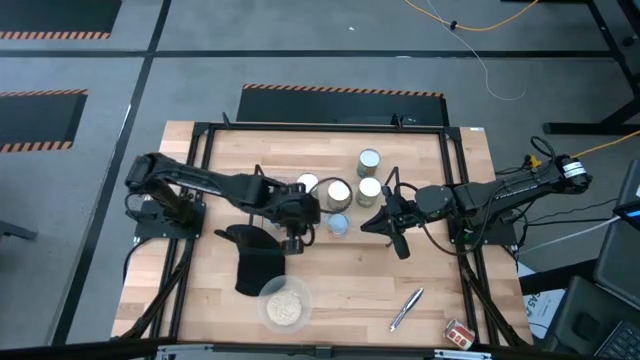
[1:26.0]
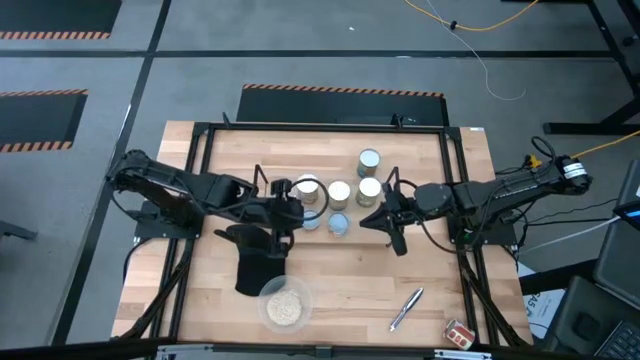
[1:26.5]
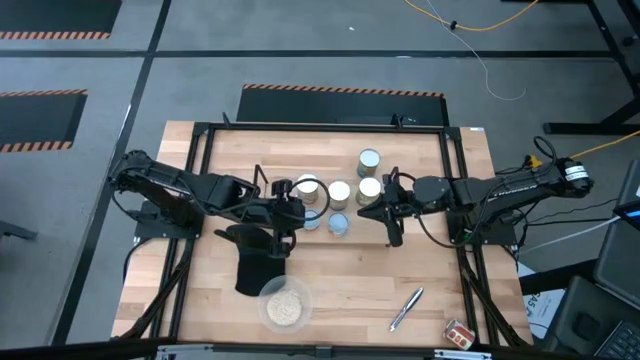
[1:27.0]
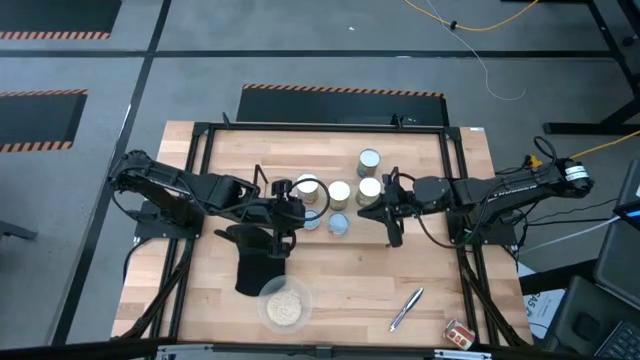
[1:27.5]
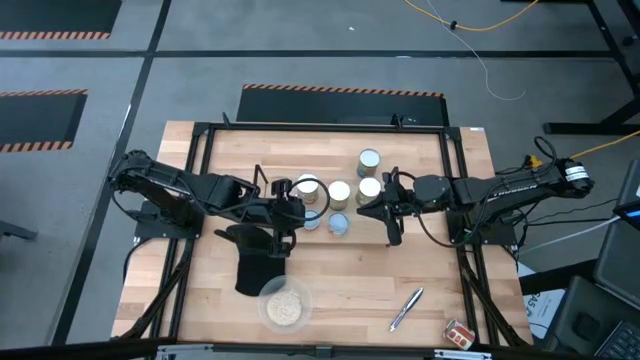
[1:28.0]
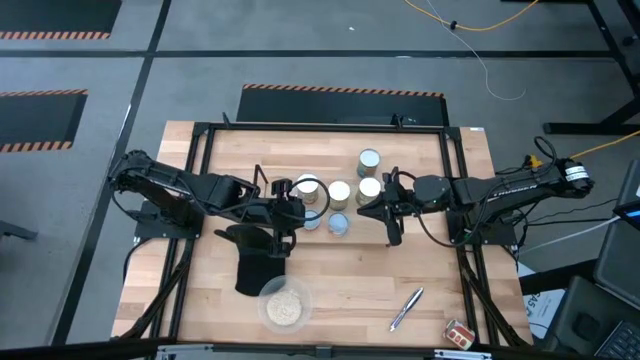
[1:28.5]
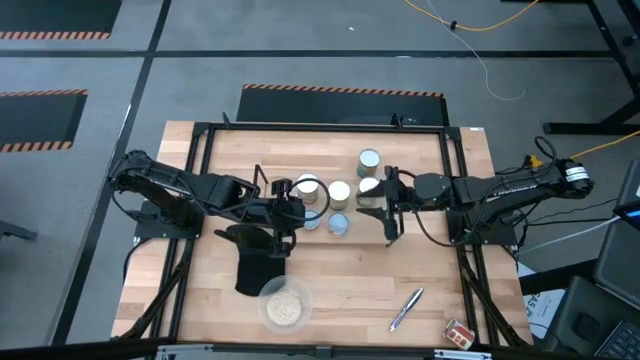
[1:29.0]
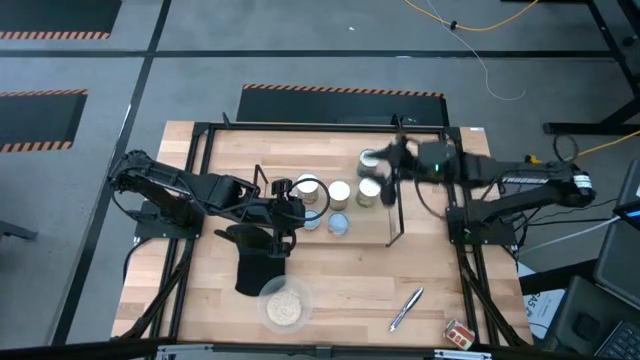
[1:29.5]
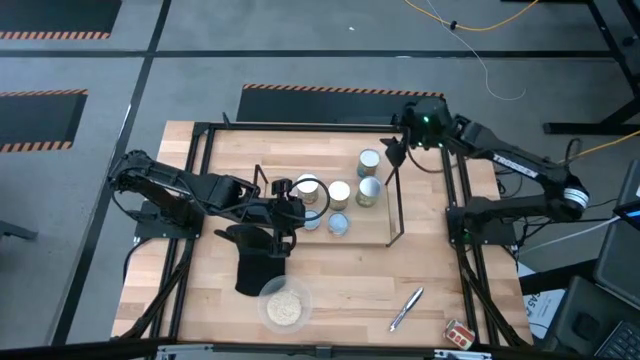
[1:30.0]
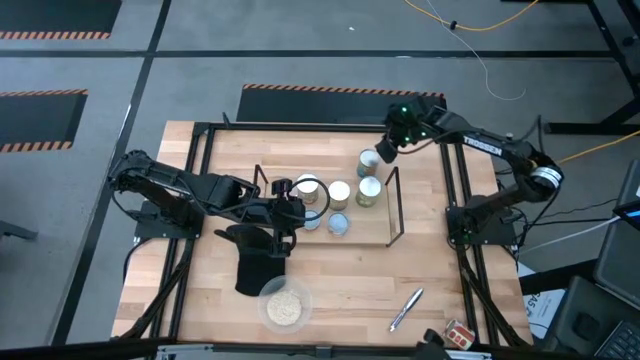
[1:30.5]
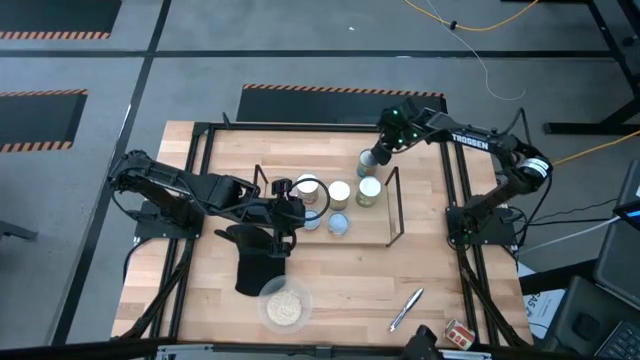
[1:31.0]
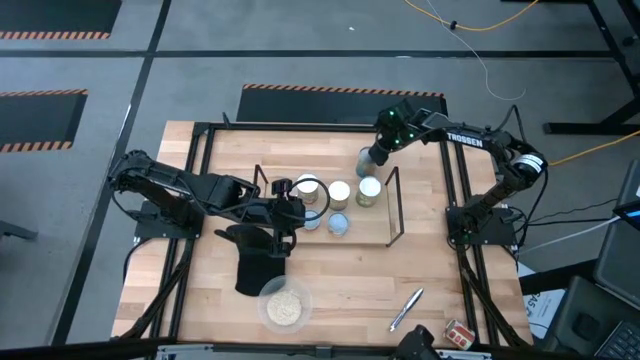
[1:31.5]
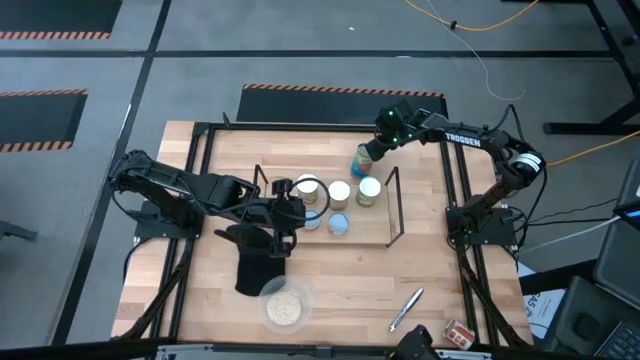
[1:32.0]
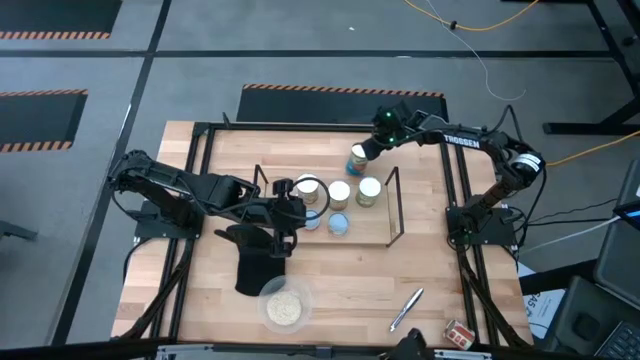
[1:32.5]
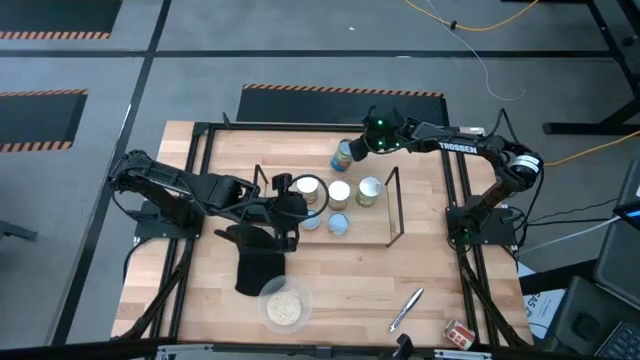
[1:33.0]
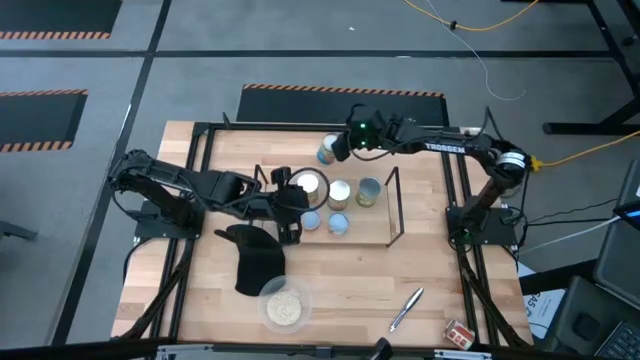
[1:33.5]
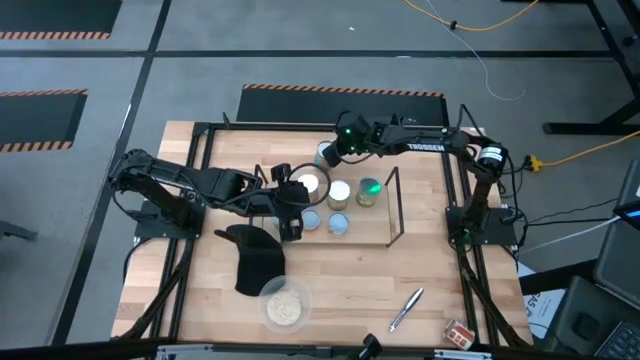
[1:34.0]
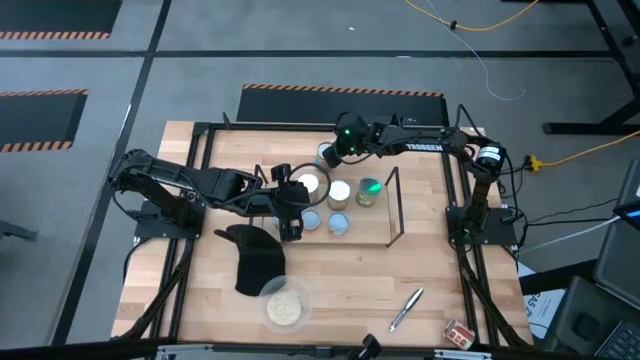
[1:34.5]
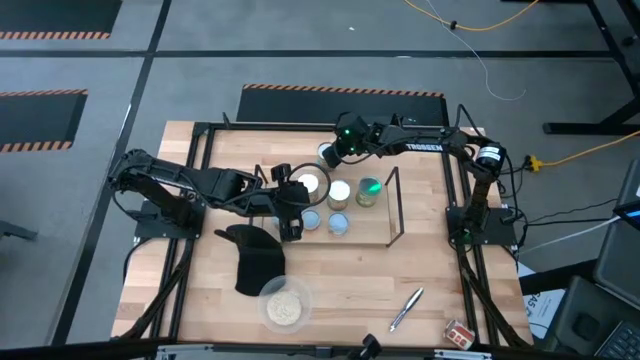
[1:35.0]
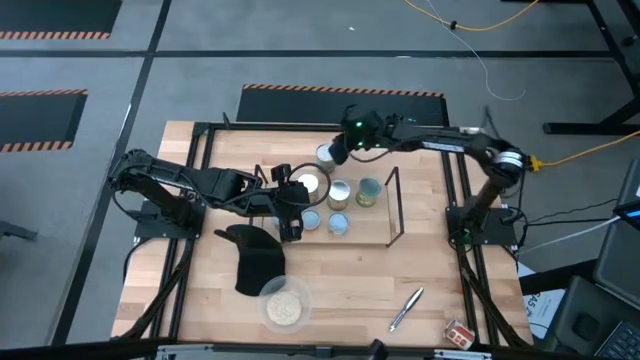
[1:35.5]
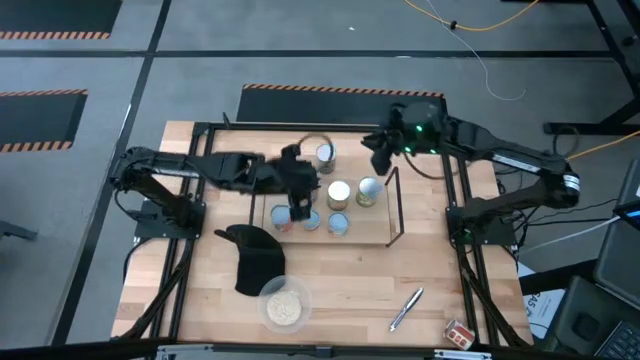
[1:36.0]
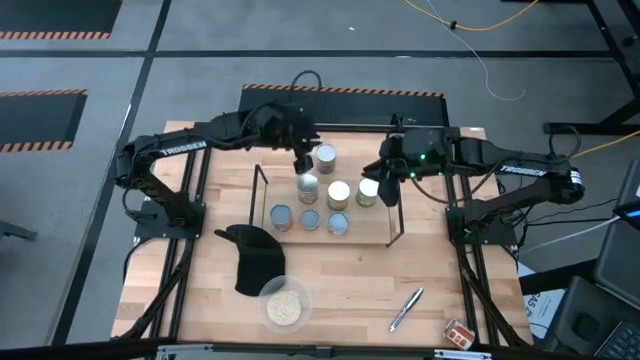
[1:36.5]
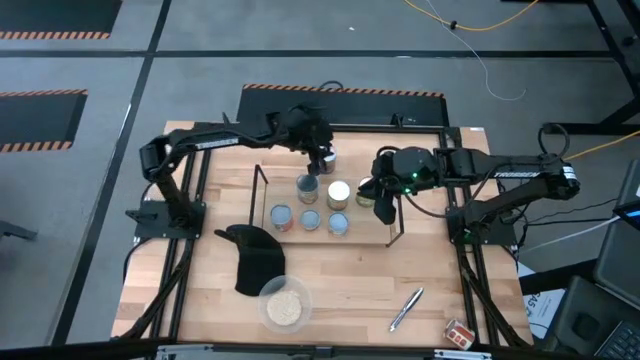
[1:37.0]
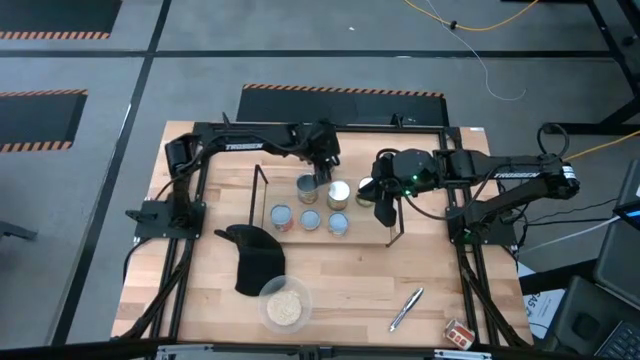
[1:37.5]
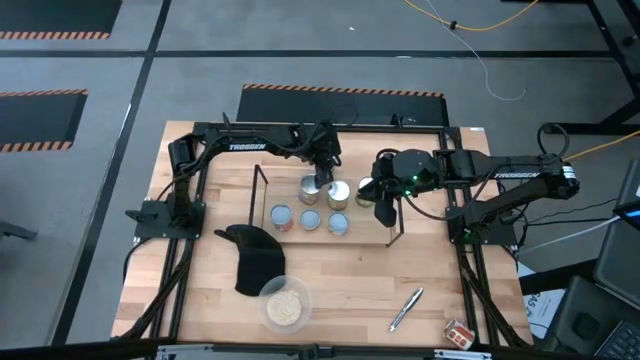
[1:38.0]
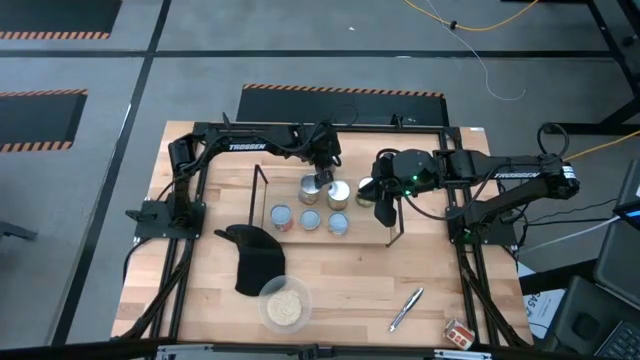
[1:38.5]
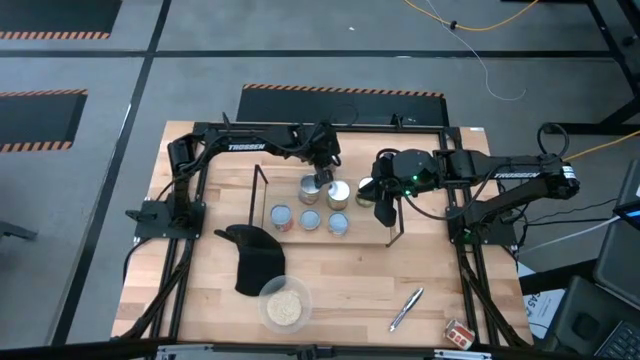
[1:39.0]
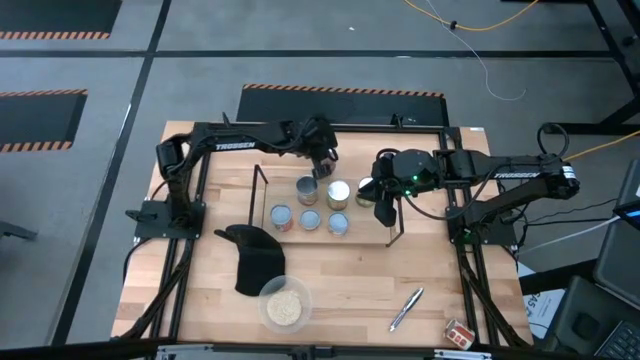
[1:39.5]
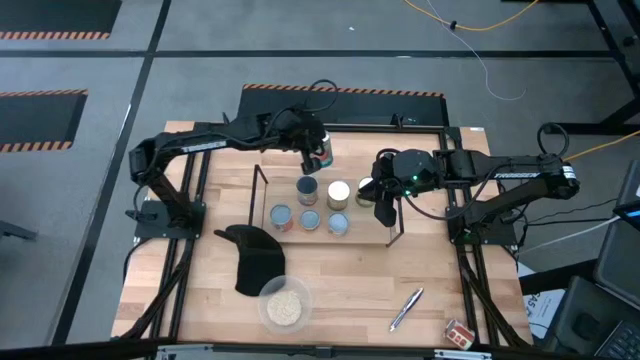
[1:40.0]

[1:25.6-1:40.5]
Task: Pick and place cans onto a shelf
Put the large canned tomatoes on the shelf
